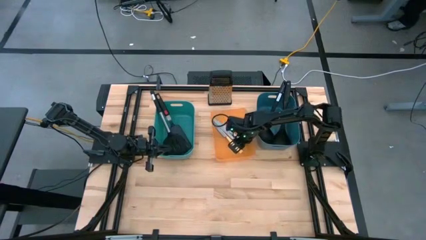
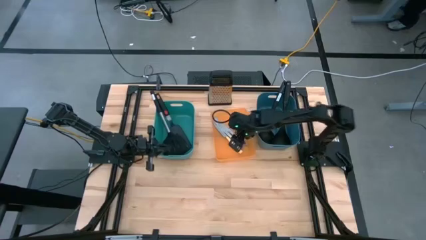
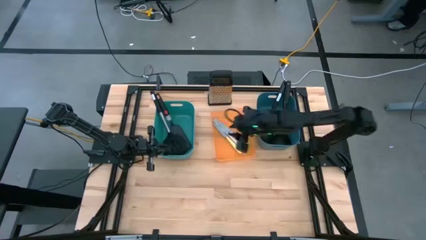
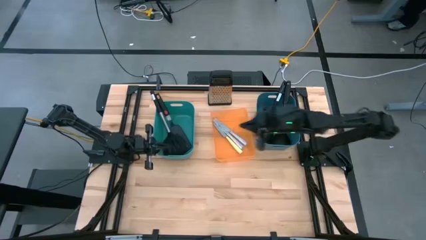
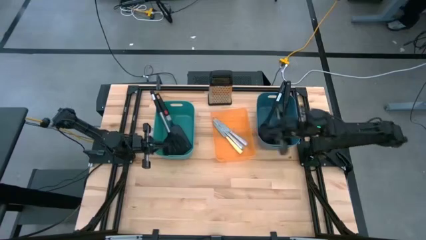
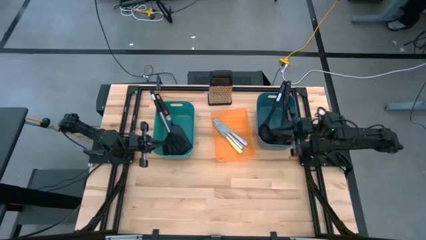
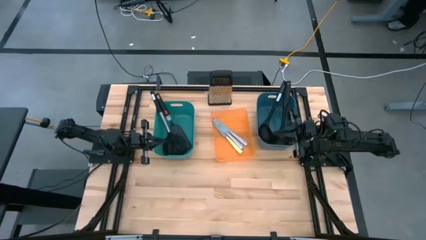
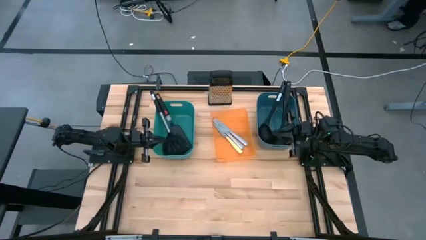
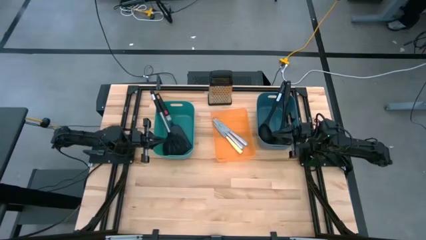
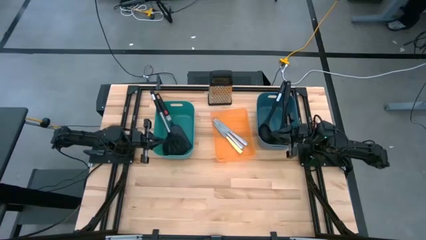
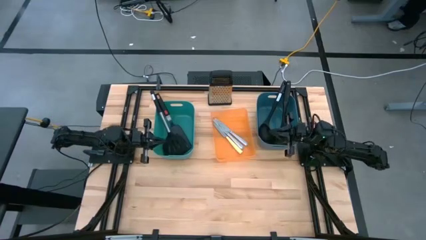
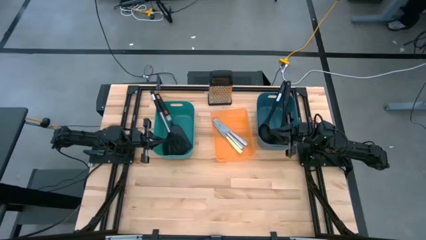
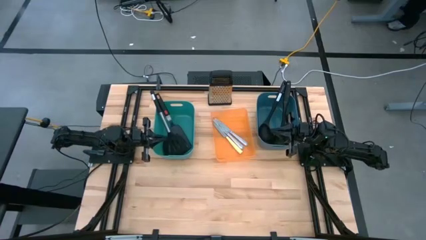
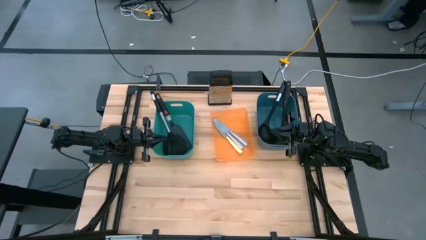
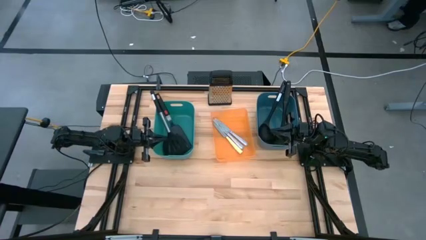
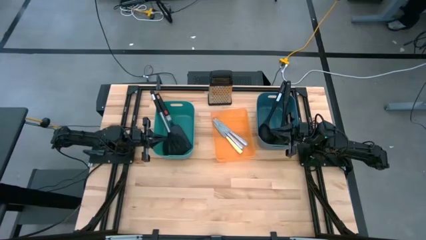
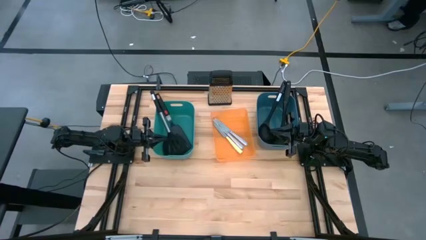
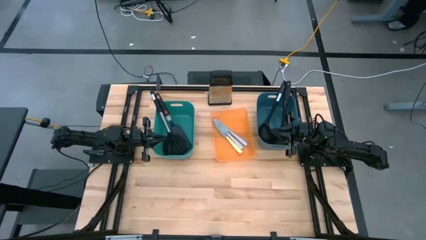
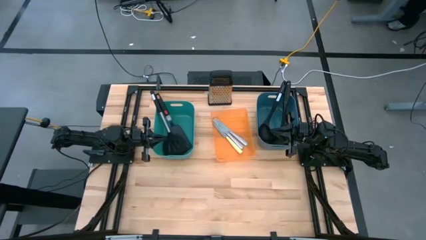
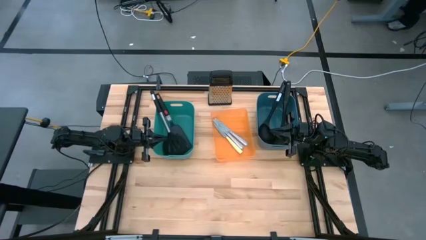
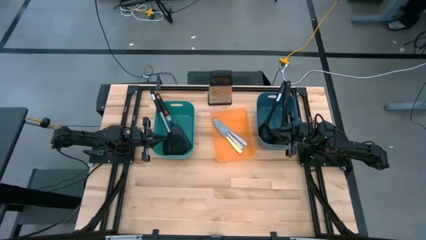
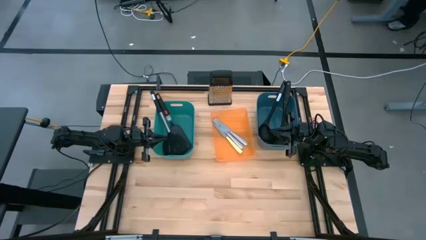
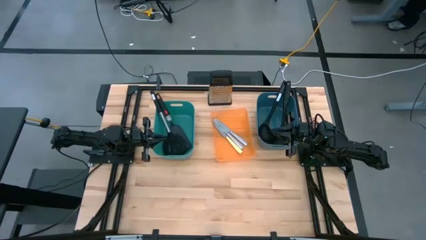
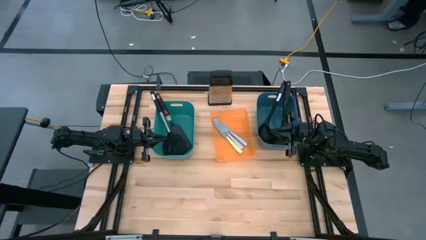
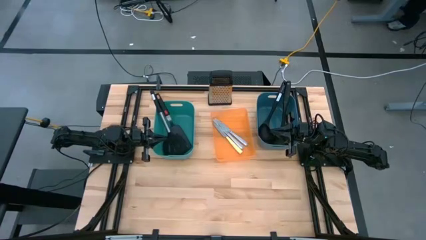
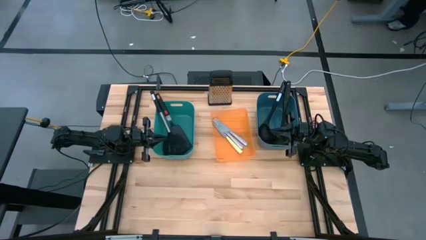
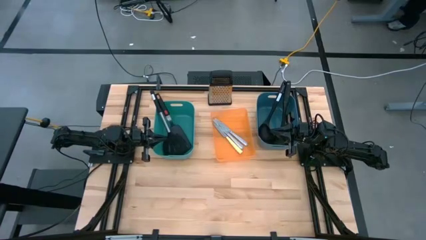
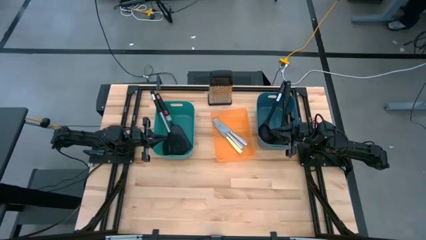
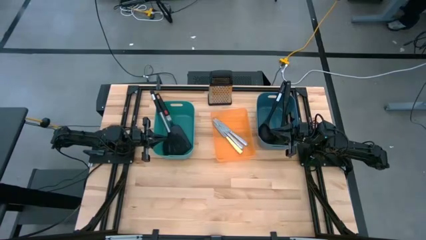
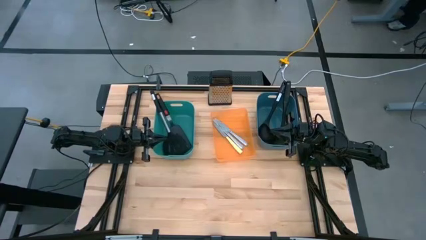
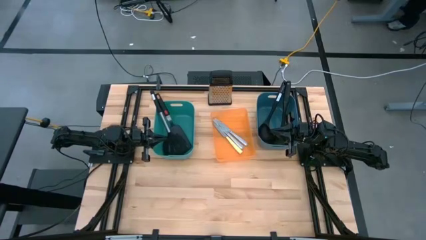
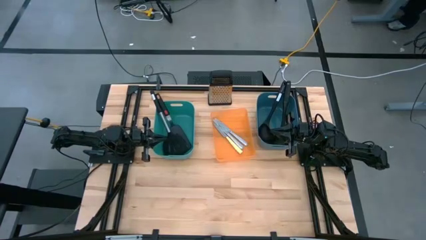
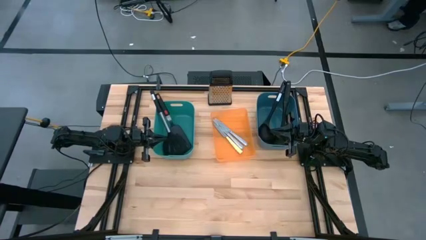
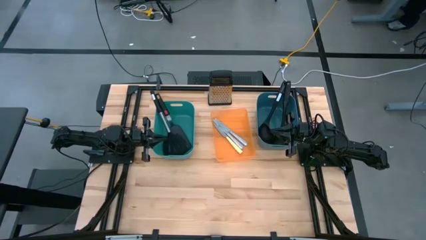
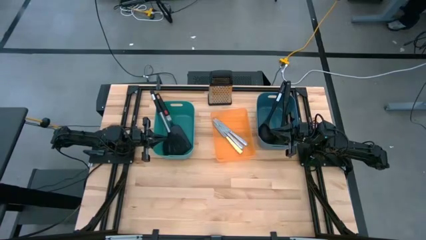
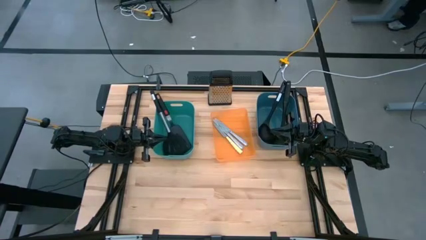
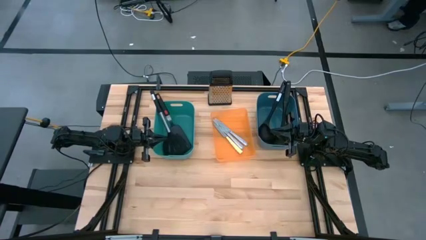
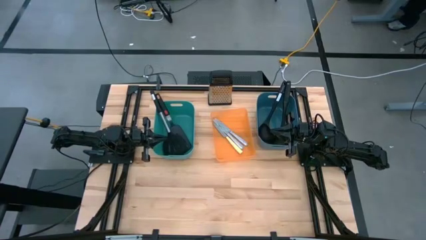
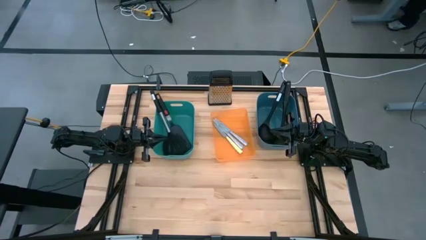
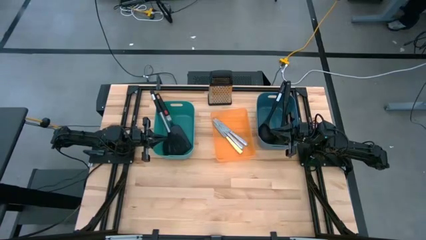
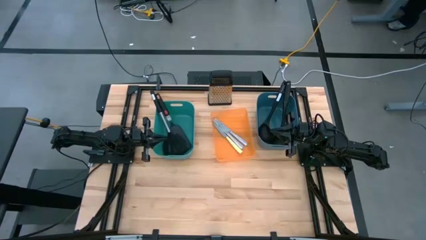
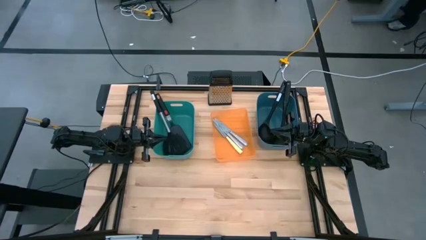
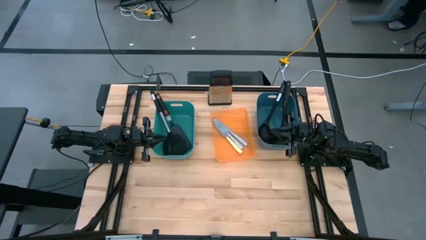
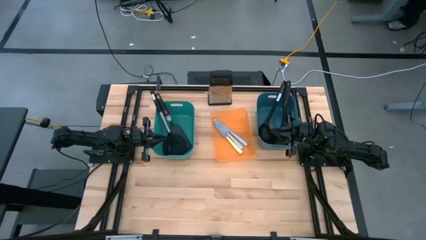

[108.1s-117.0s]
Task: Pick & Place Kitchen Items
Return to Home Position

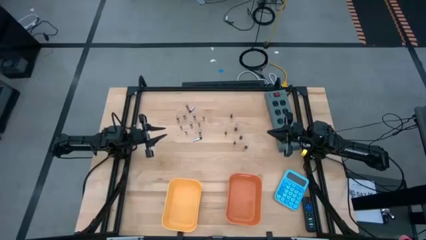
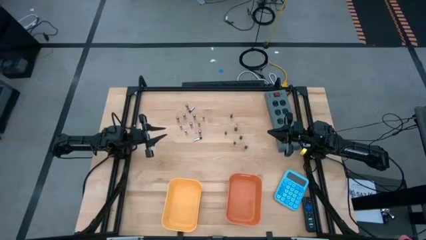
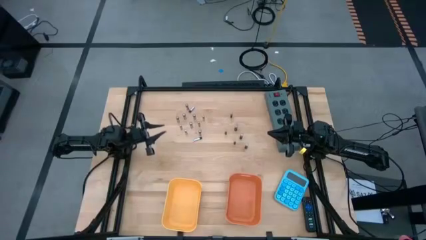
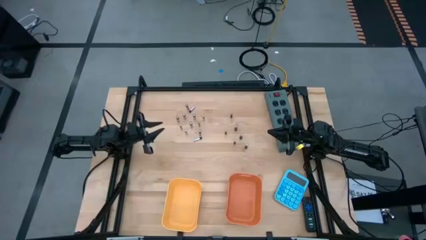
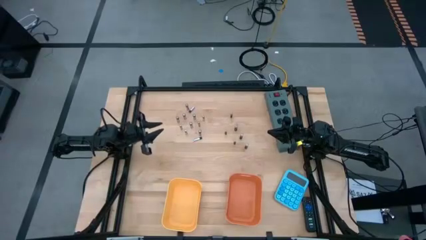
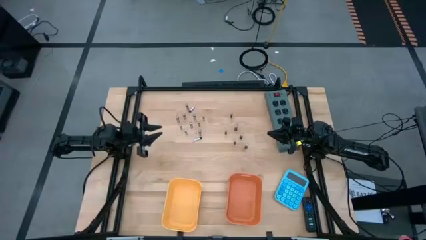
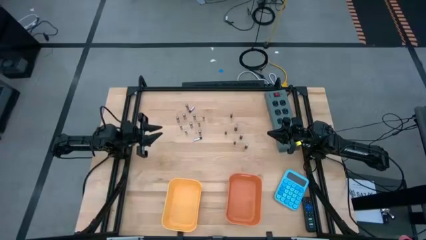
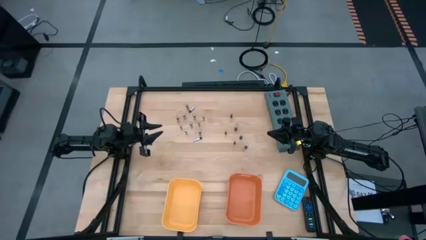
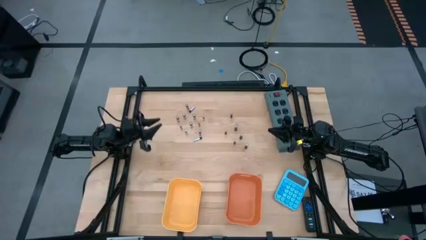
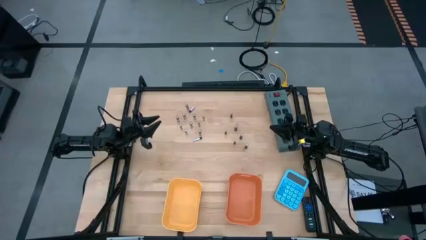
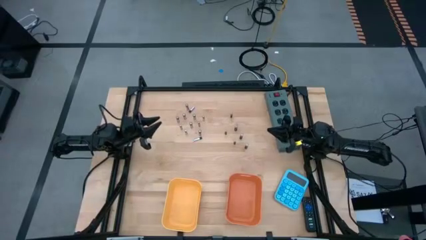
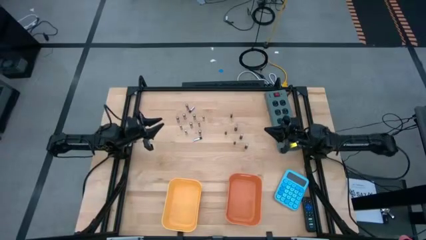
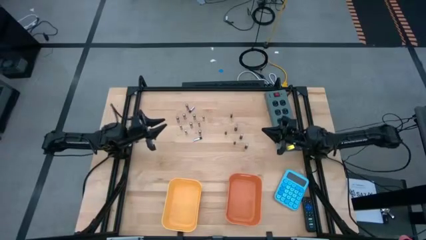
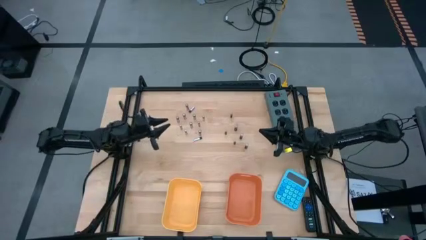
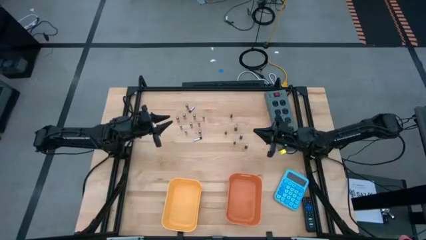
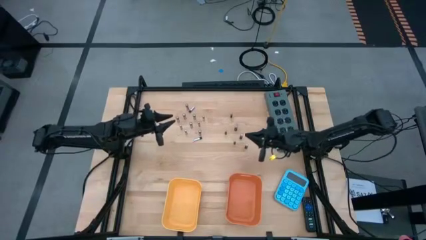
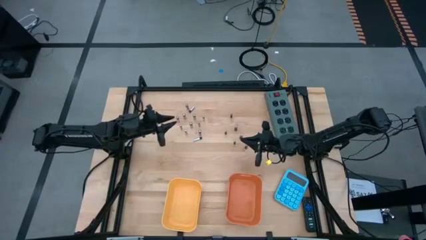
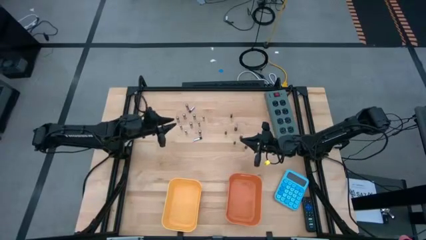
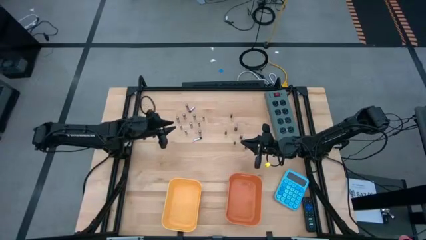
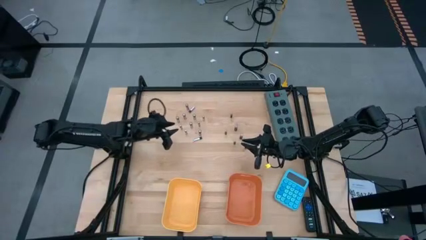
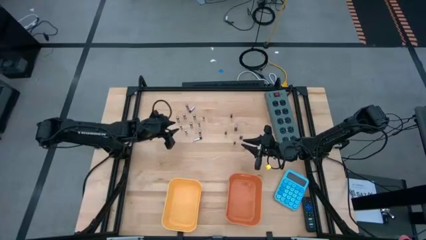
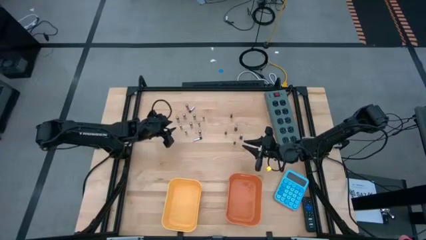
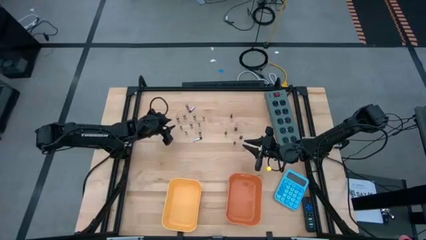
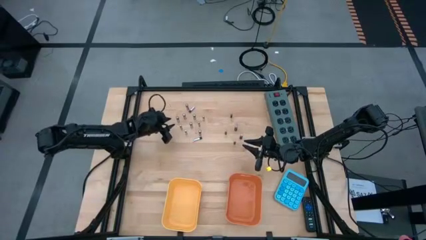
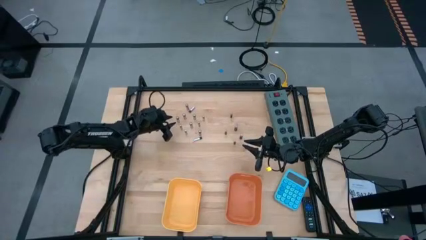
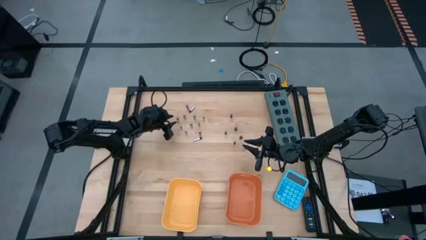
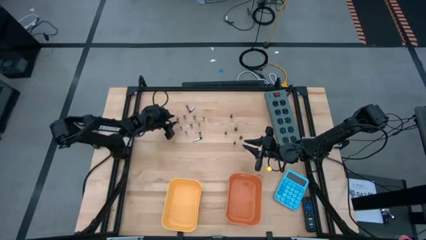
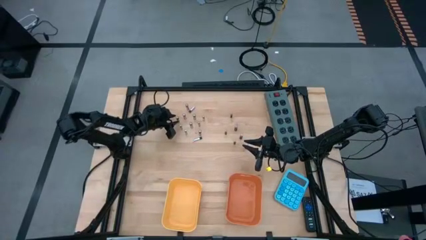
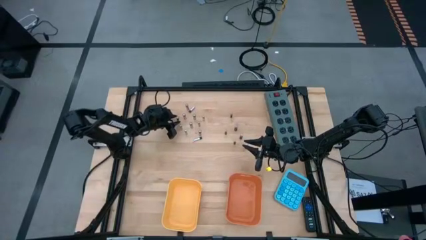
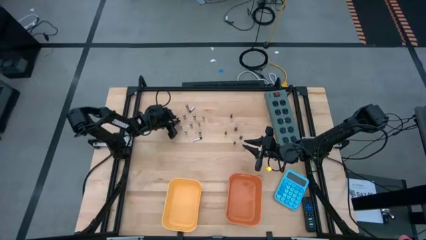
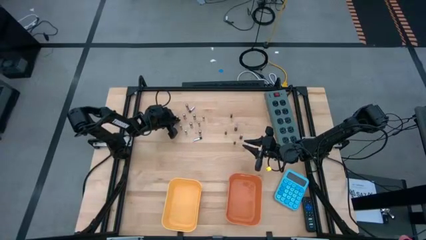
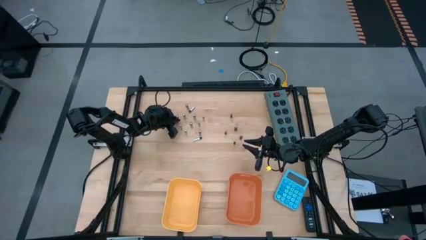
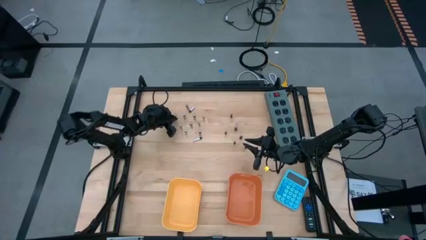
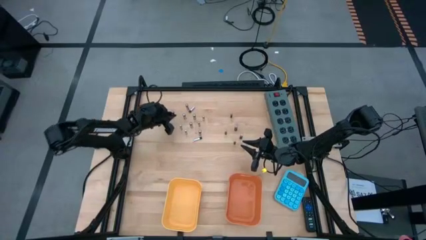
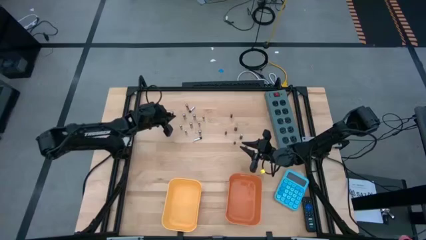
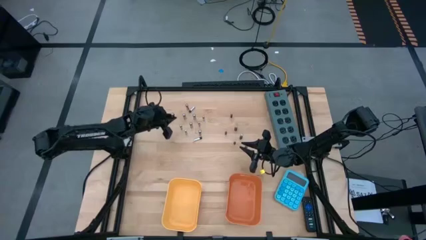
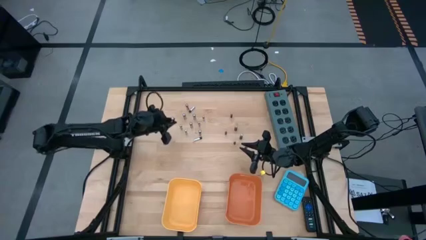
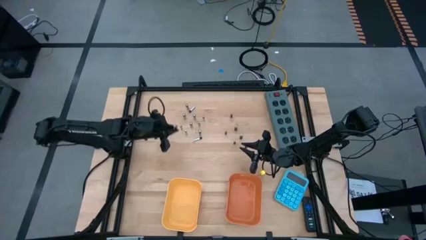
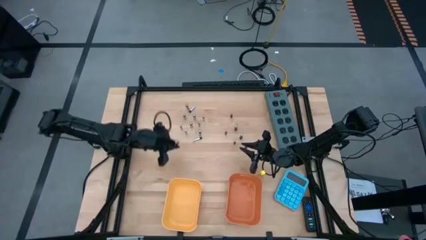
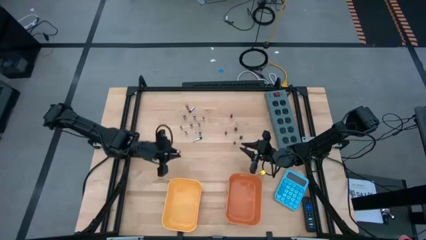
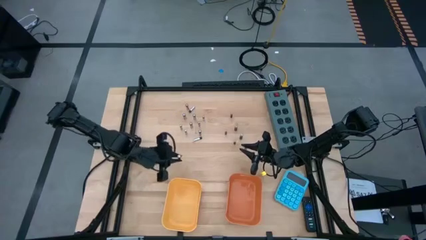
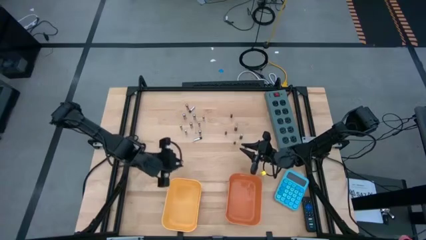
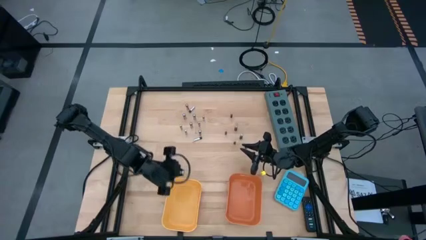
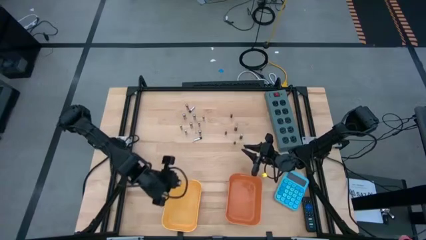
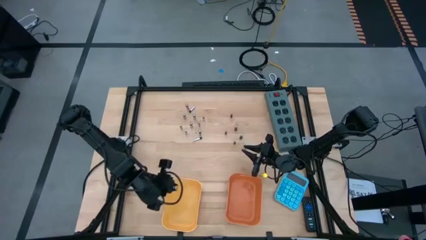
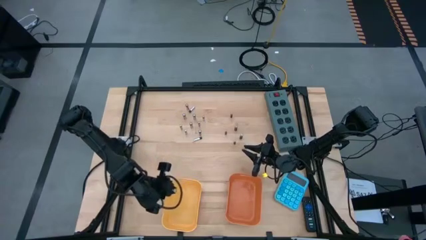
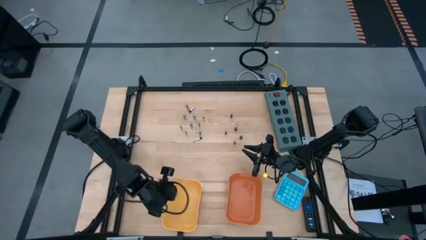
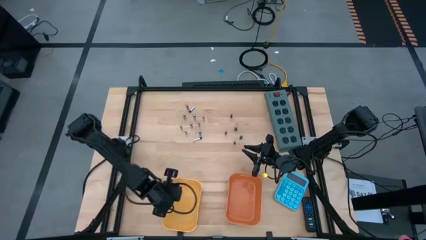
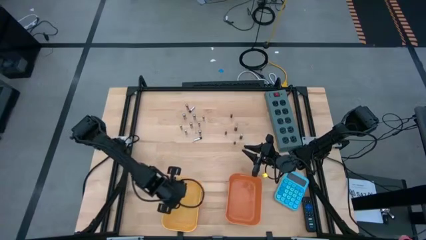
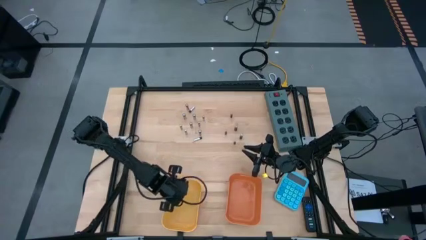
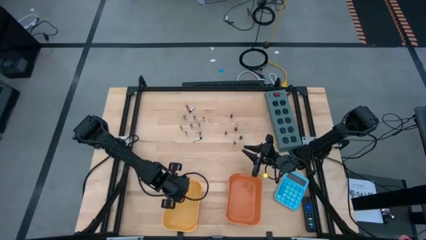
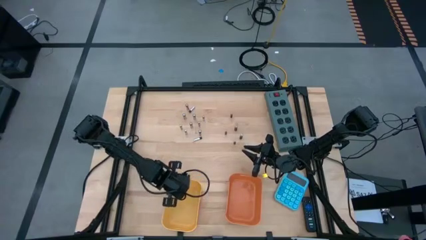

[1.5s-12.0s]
Task: Sort batteries
Put the silver battery into the yellow bin
